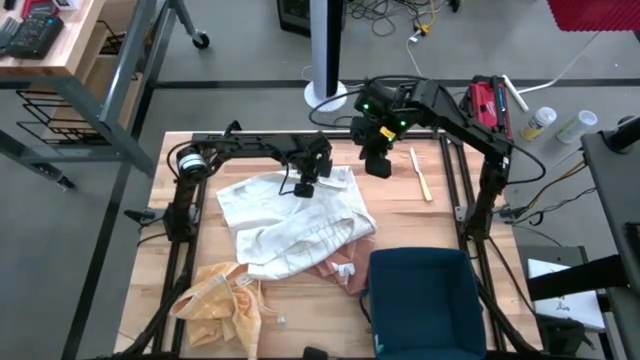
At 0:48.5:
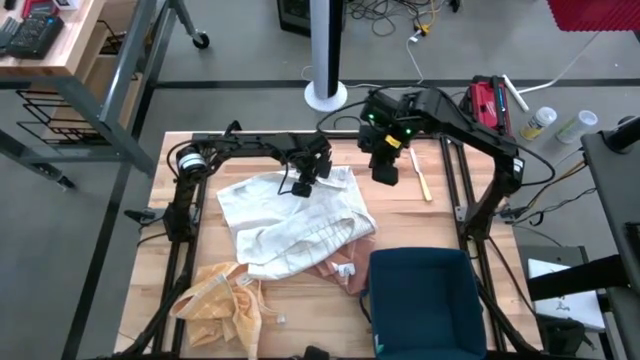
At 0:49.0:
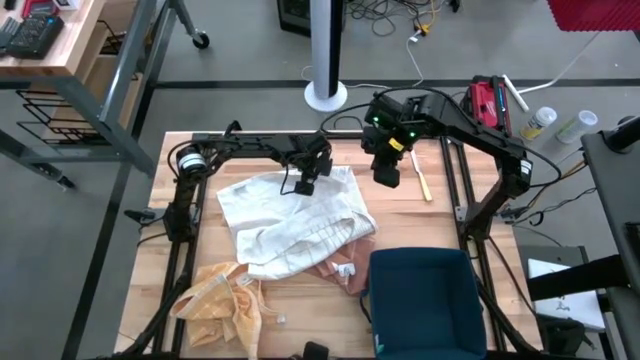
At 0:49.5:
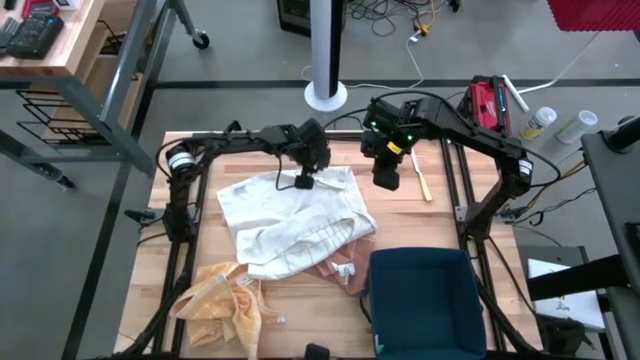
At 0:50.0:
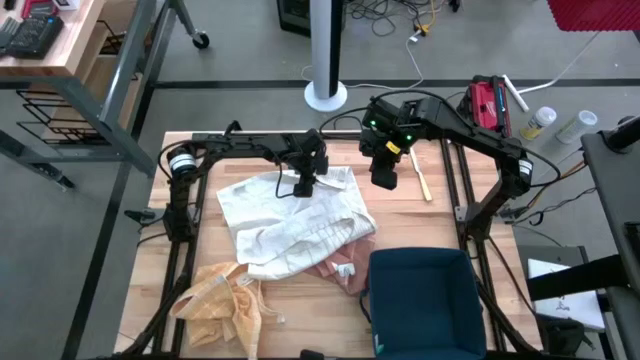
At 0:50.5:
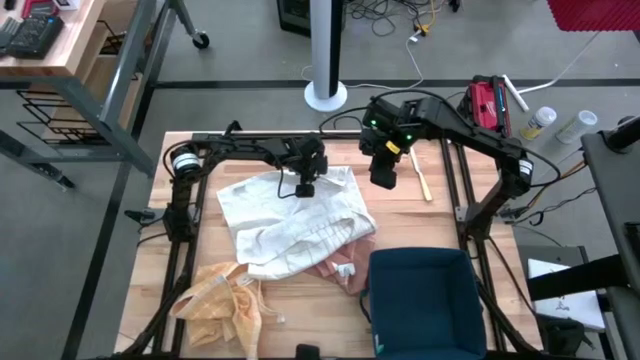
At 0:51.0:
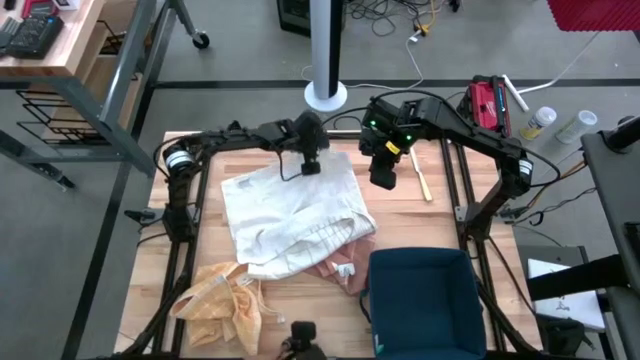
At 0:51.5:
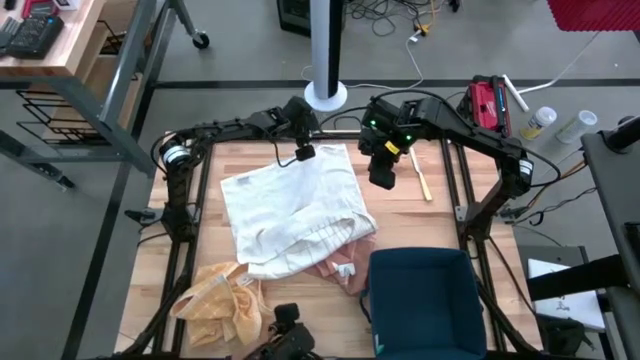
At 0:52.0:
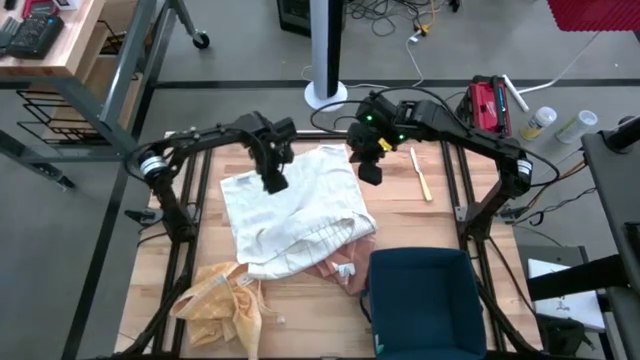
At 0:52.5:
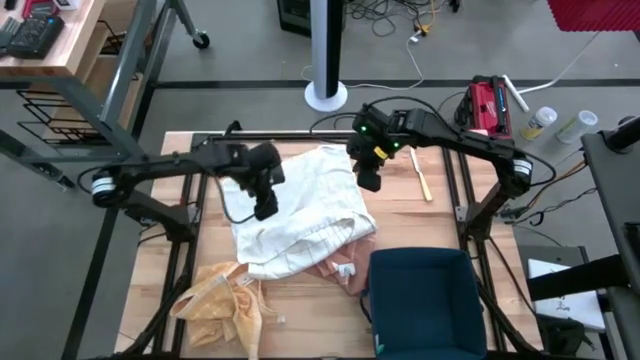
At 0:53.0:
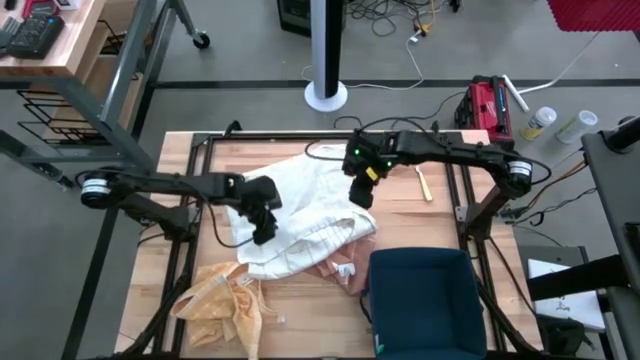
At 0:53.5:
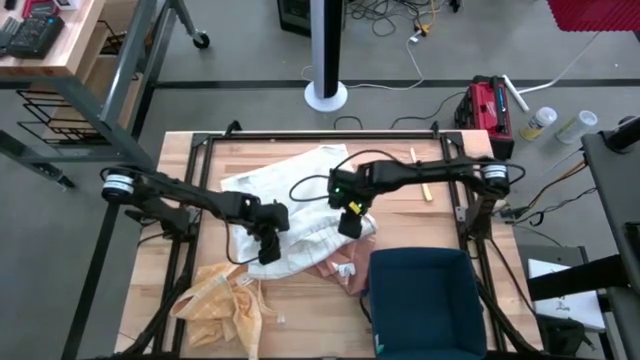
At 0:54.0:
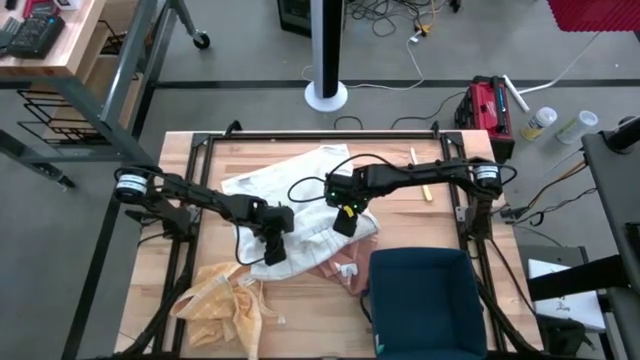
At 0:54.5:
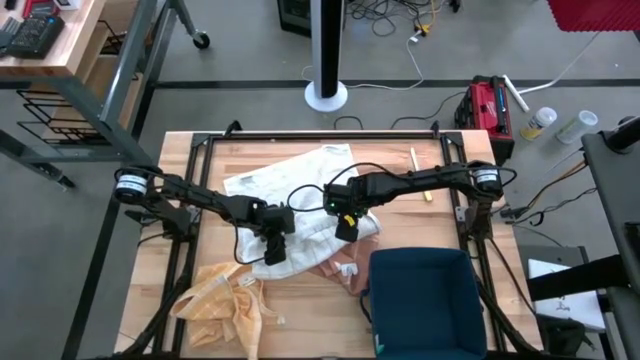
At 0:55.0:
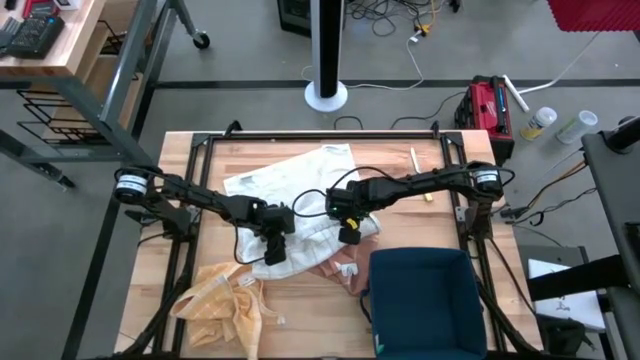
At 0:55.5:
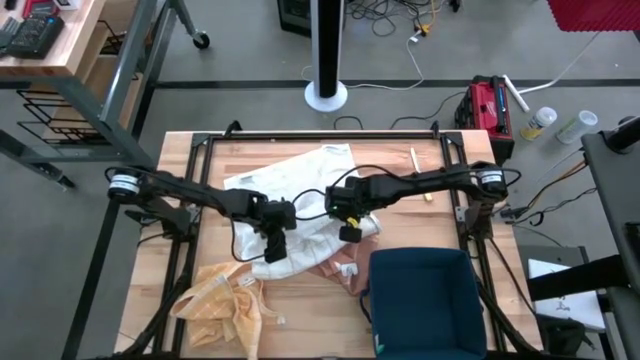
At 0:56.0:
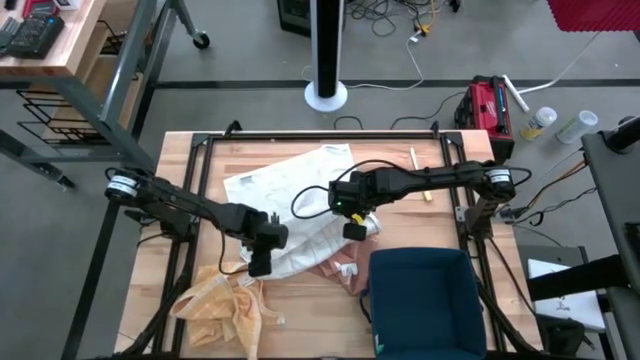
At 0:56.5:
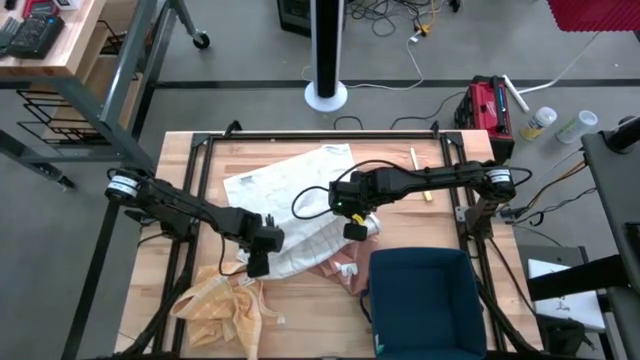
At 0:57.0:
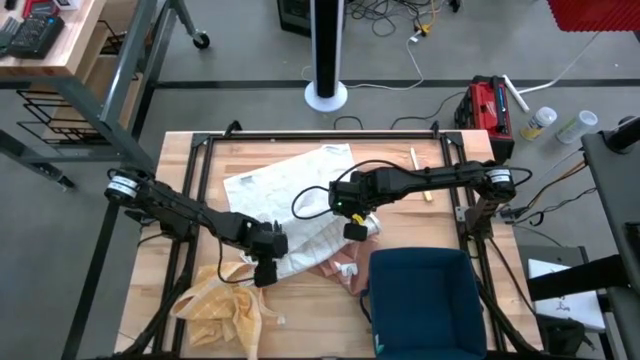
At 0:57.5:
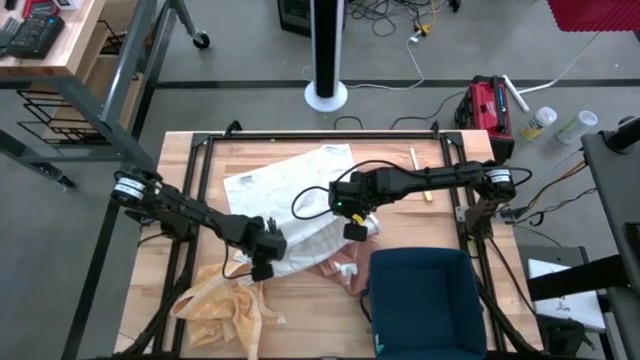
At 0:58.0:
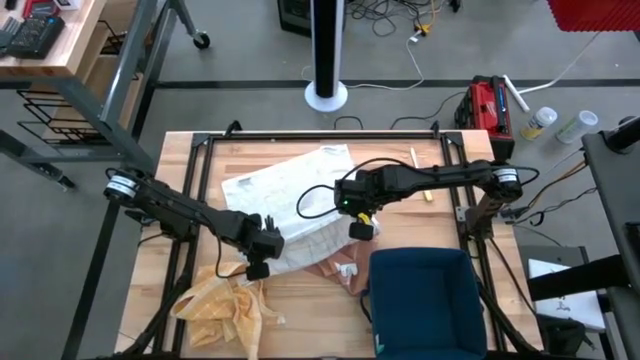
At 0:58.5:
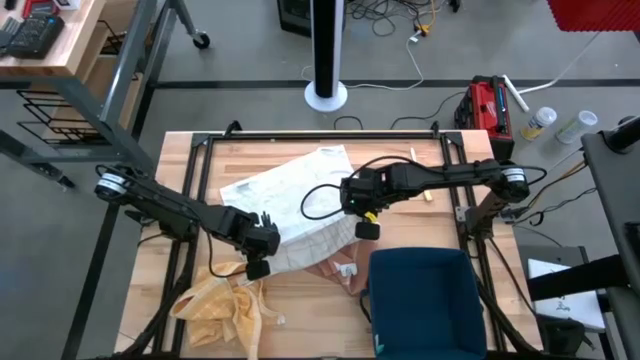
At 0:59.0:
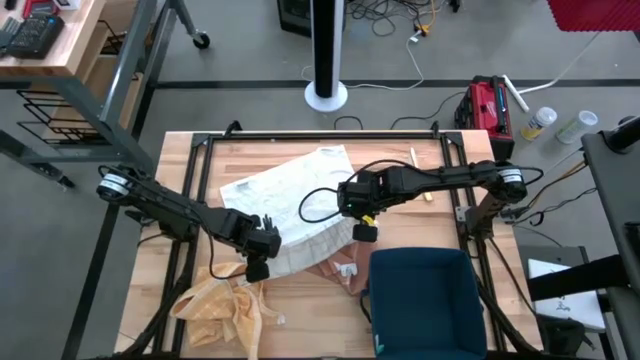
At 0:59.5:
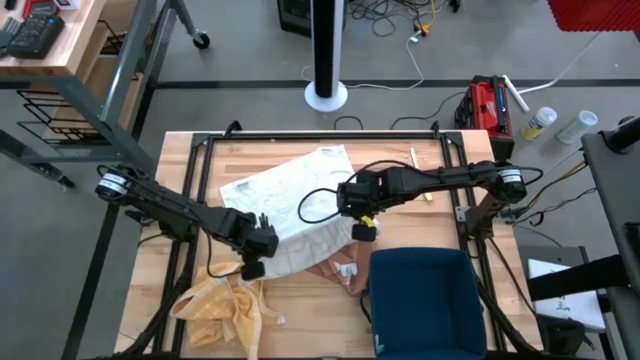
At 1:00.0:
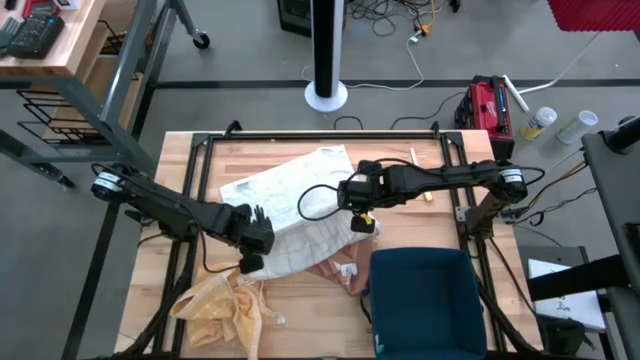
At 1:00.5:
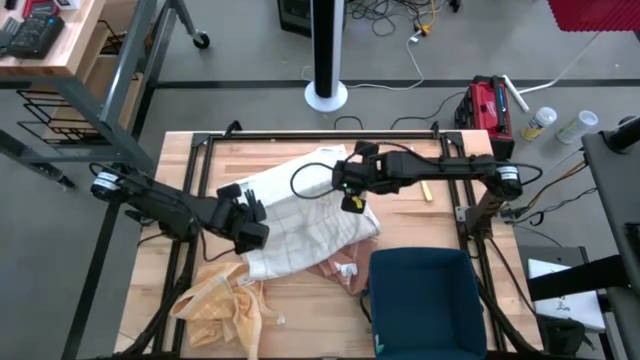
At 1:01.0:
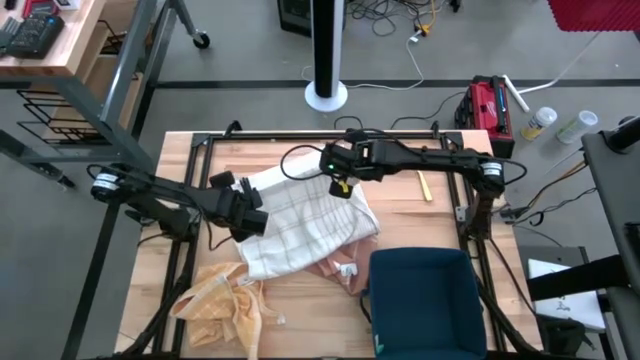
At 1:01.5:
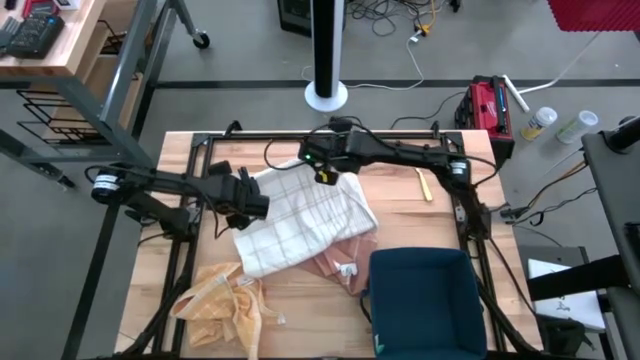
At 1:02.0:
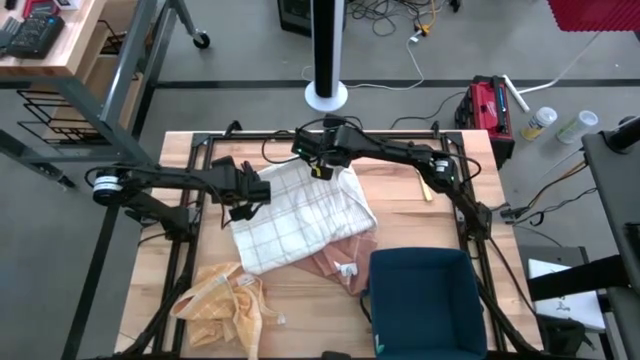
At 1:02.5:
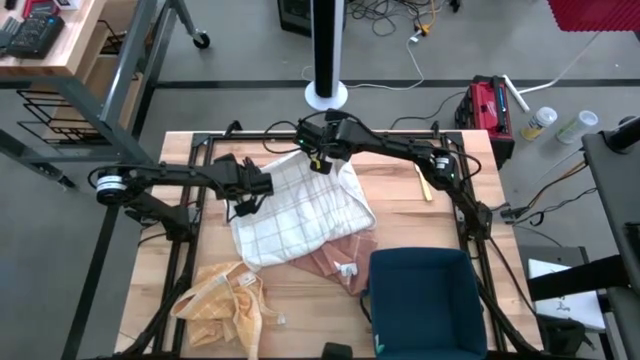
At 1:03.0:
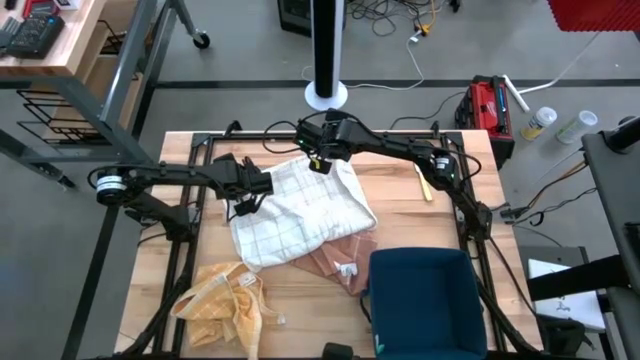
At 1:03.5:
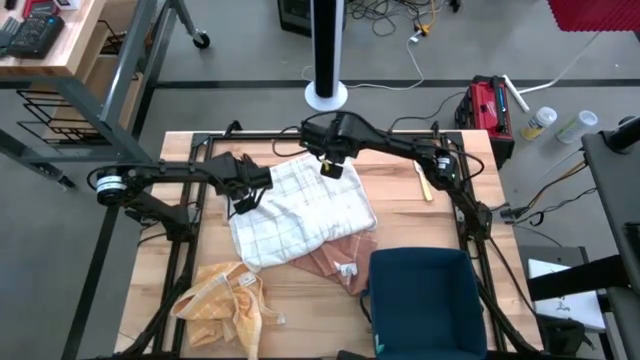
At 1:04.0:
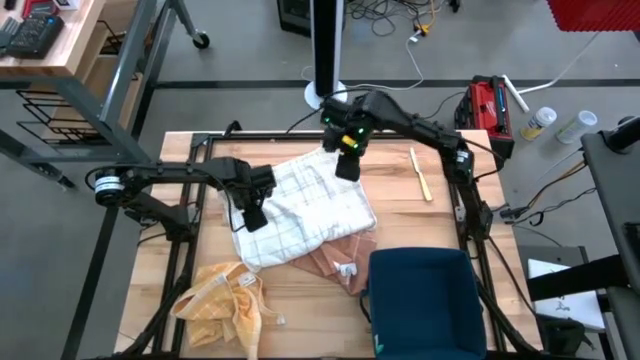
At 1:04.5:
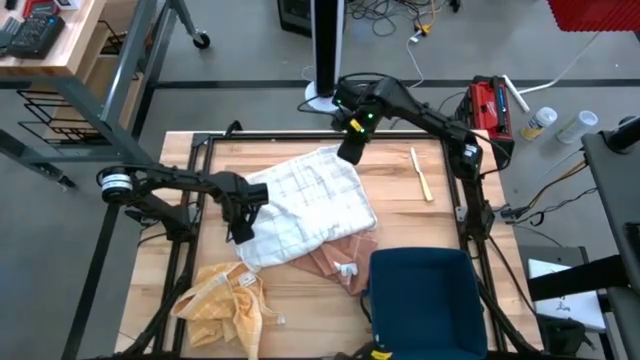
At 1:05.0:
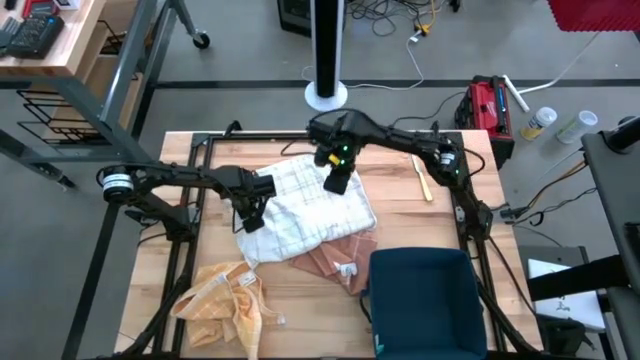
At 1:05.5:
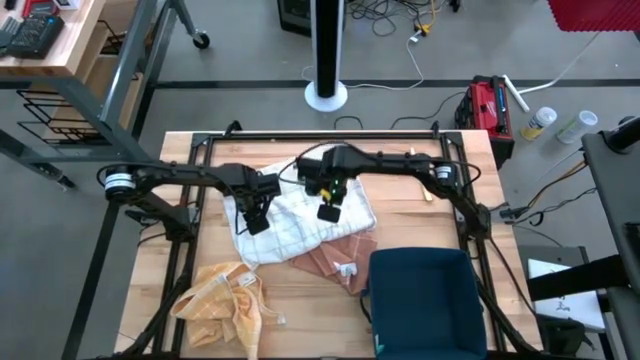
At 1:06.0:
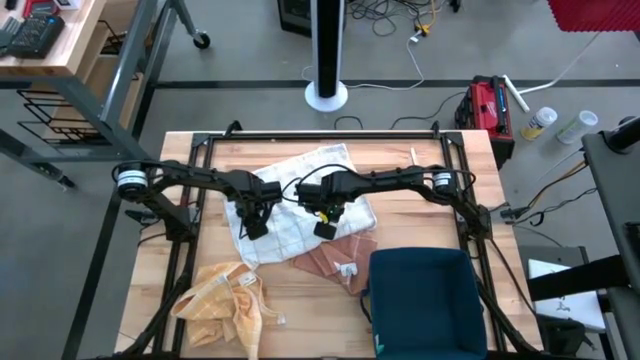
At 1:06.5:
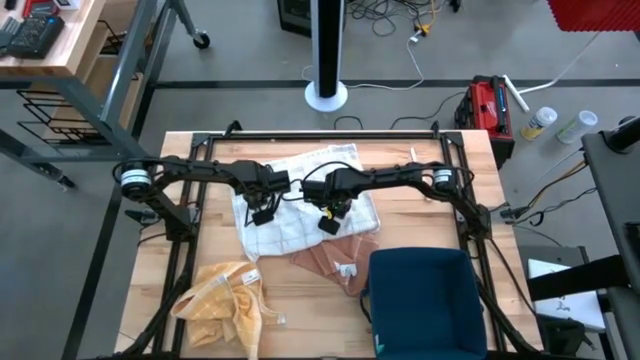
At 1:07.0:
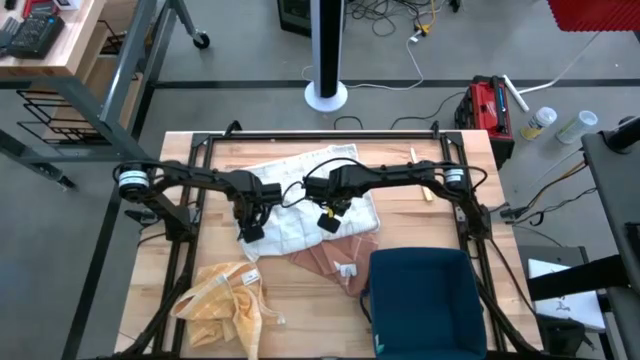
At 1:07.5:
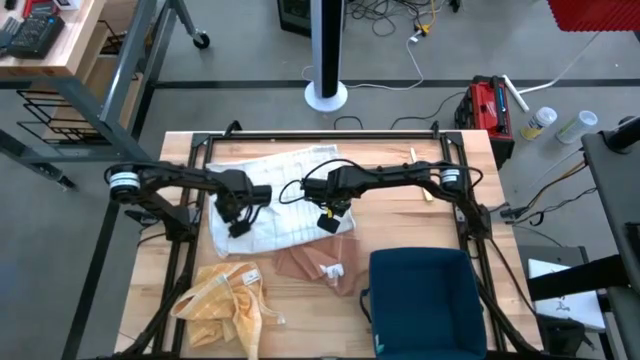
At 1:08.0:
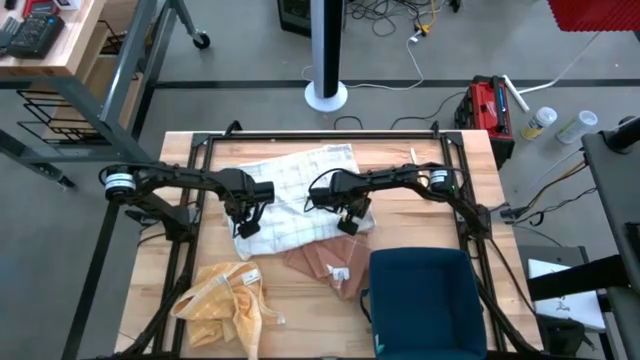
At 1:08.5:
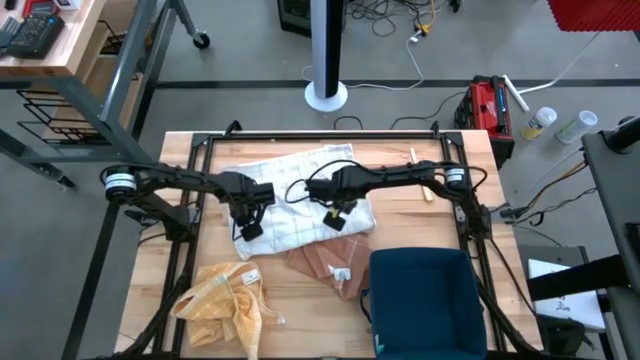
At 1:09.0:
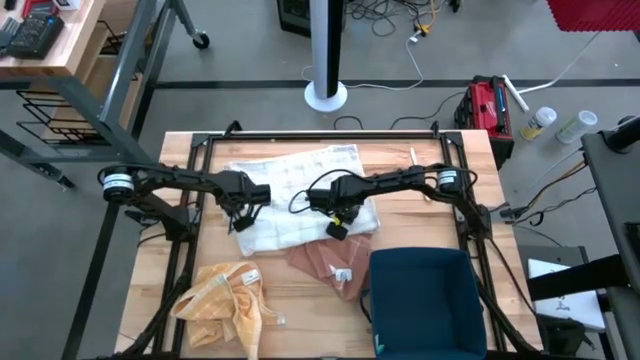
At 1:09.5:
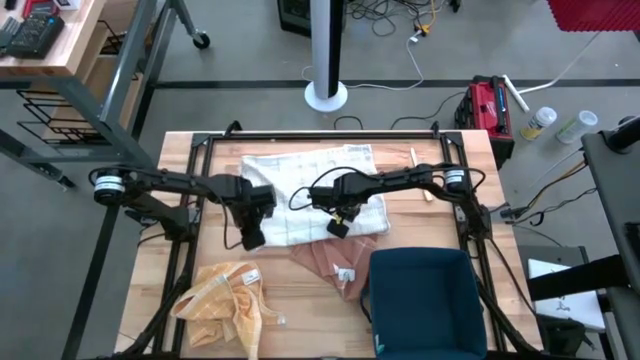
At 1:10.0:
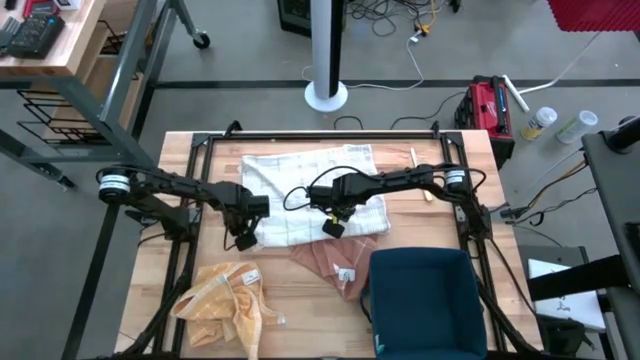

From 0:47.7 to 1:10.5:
Task: Fold towel
Fold the white towel
